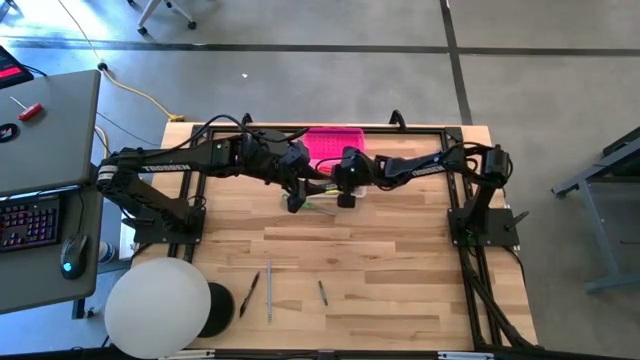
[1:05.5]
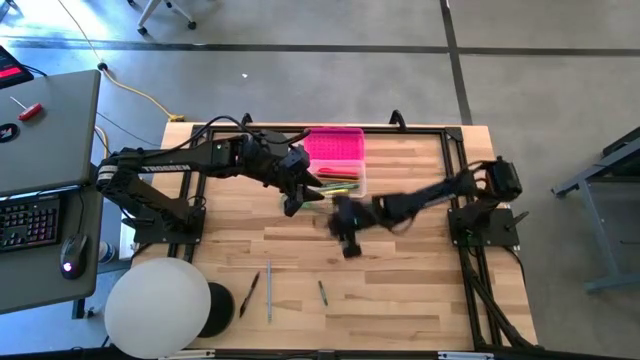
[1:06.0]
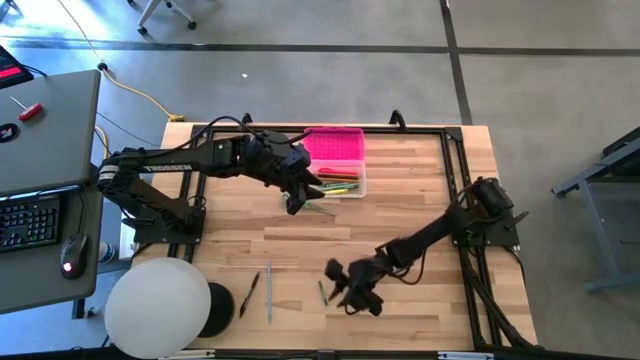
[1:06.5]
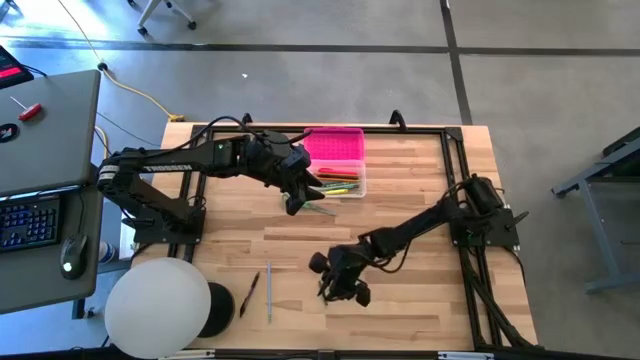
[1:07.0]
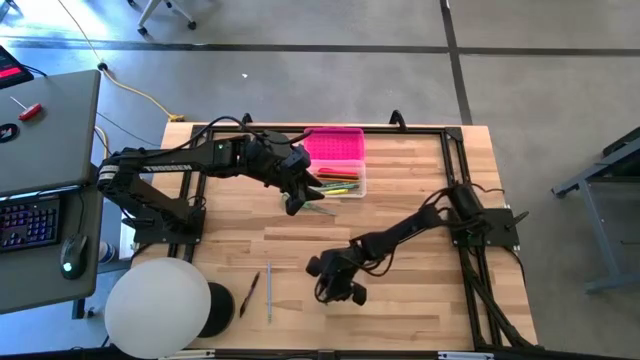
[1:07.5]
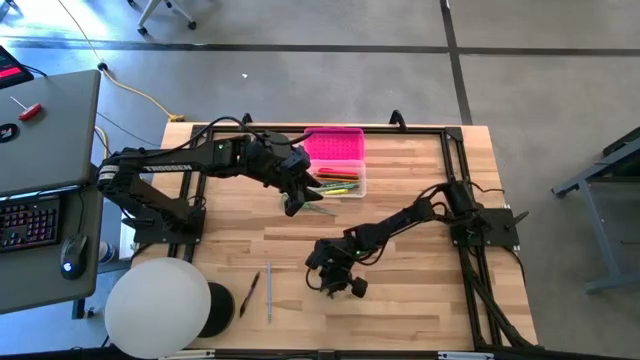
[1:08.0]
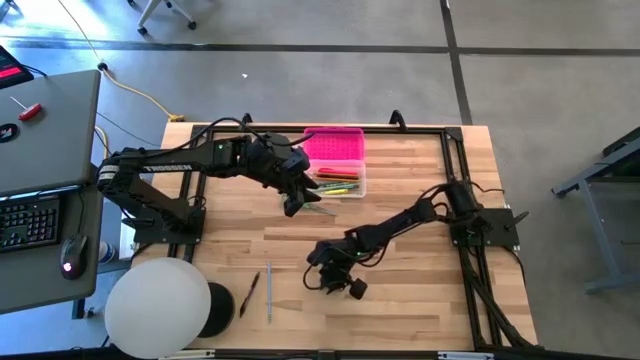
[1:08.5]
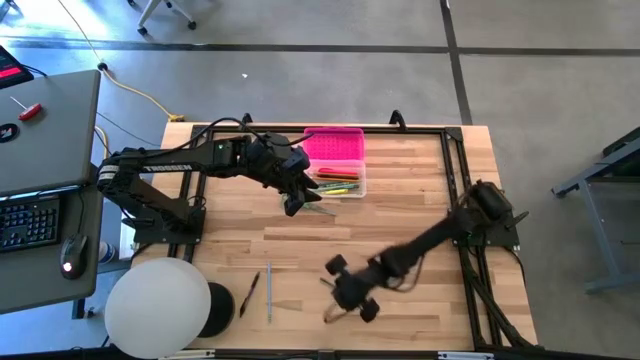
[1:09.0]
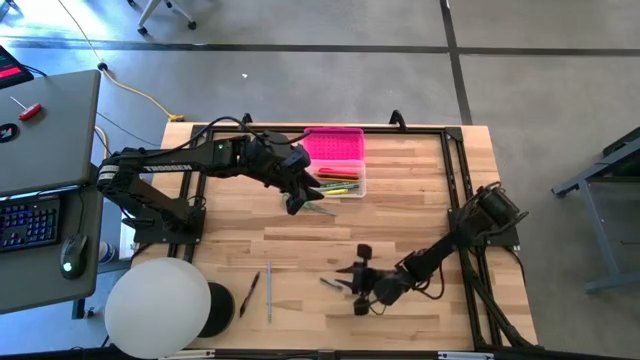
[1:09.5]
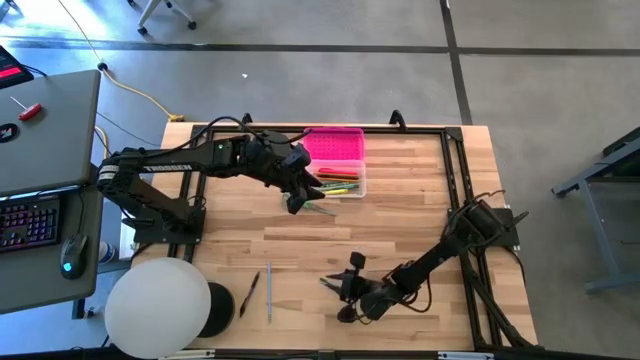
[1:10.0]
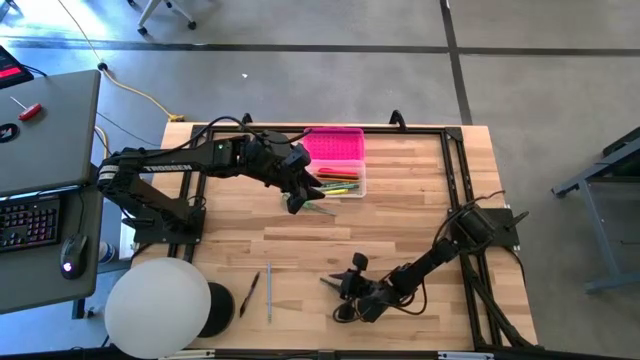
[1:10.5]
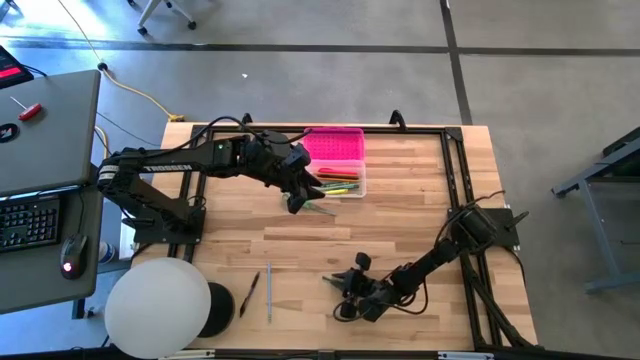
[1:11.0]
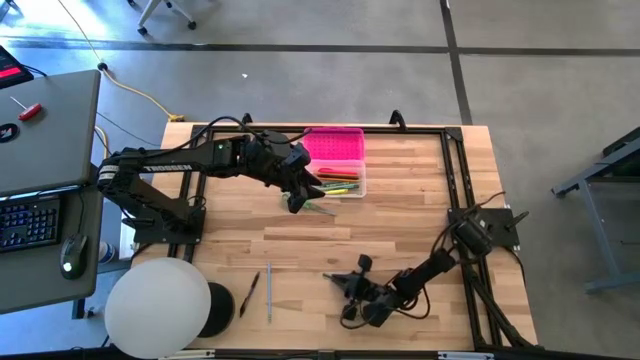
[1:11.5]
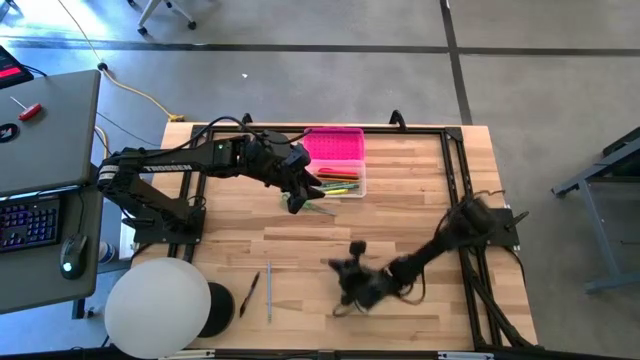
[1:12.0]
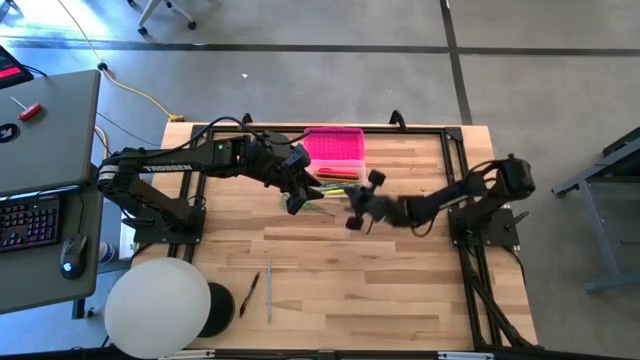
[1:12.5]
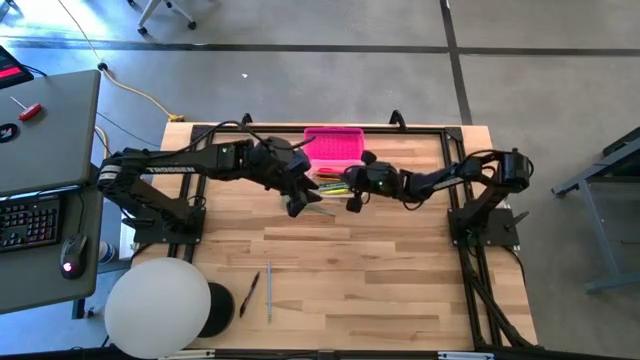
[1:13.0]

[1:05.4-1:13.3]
Task: Pick & place school supplies into a supply box
Put the dark green crayon into the supply box

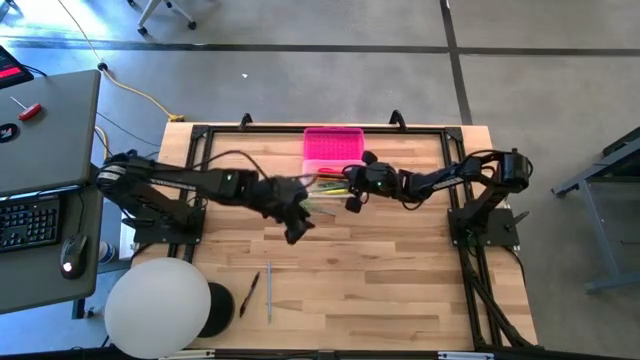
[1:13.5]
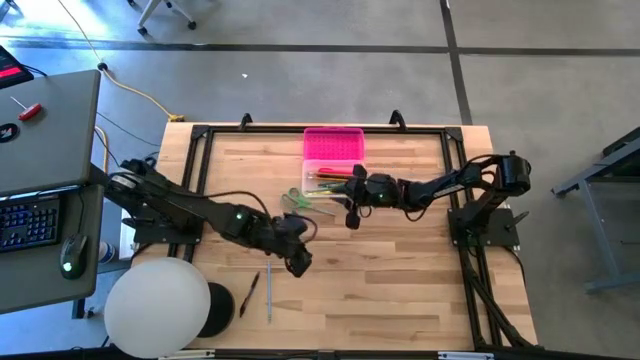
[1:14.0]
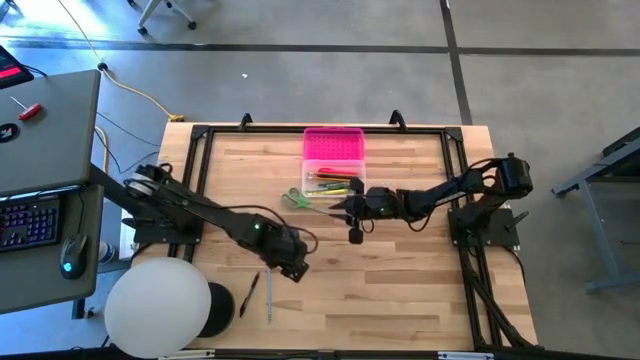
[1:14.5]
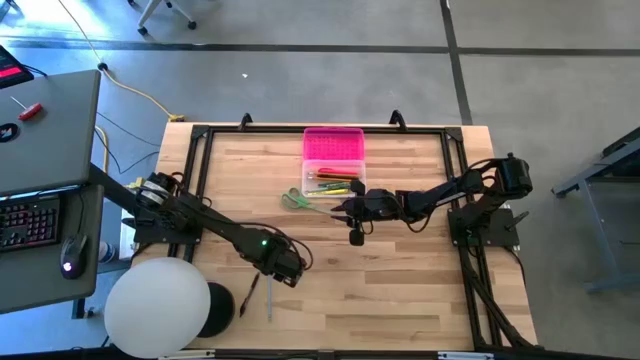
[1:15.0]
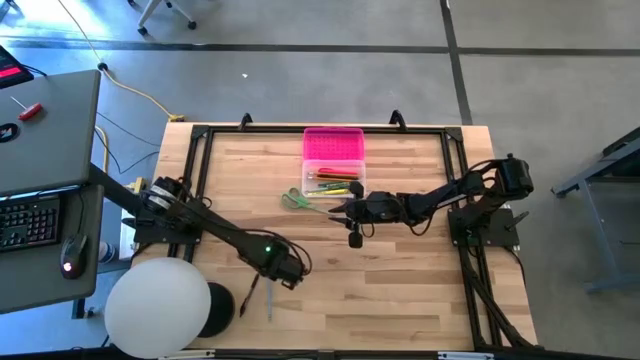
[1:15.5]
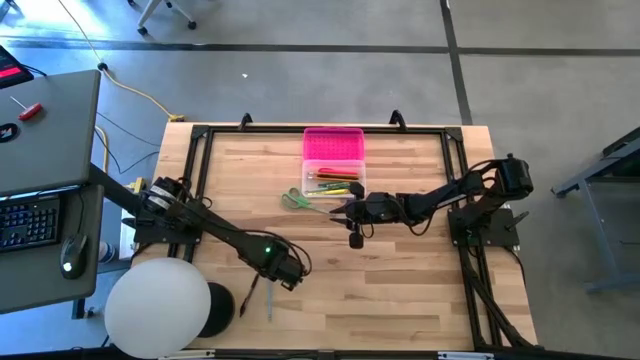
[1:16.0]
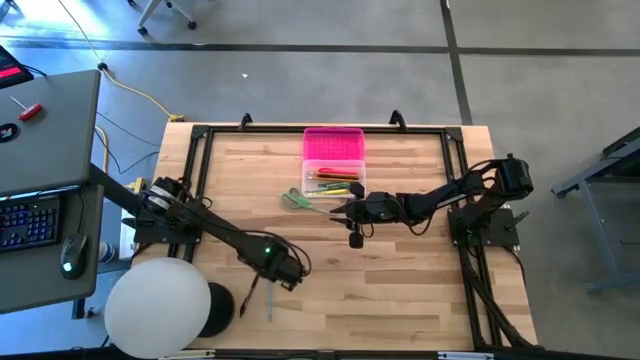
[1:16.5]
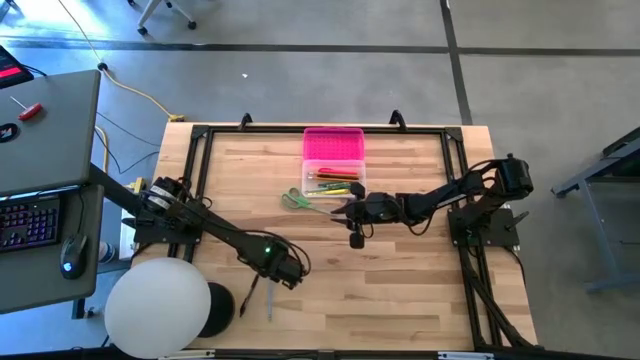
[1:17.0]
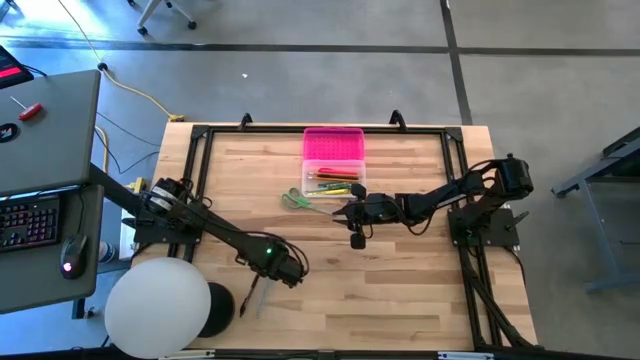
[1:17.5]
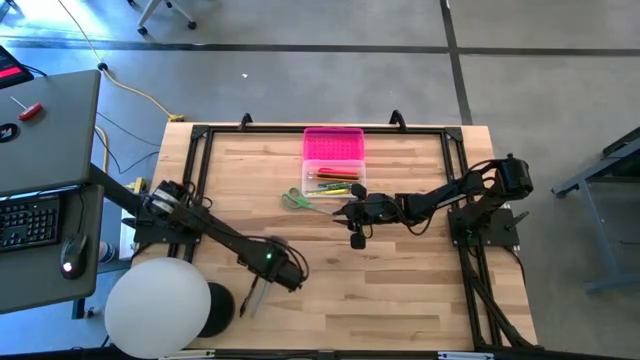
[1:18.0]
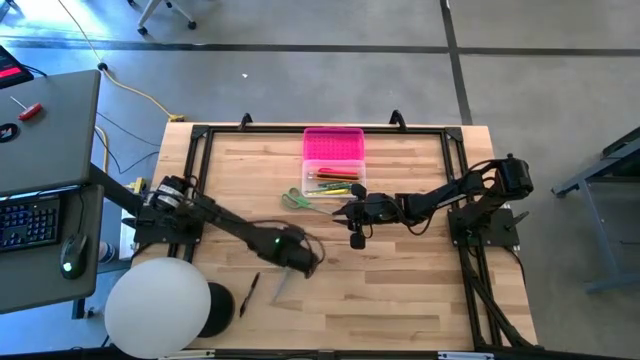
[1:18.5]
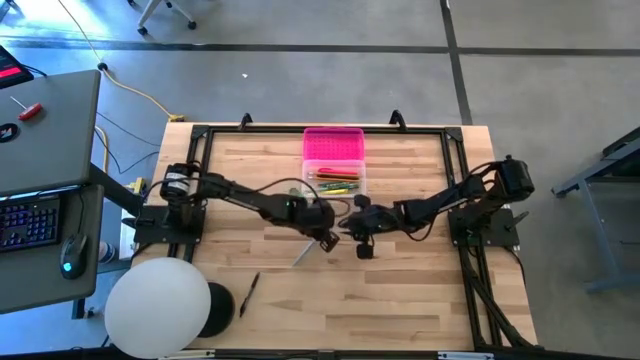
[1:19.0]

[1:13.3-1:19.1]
Put the blue pencil into the supply box

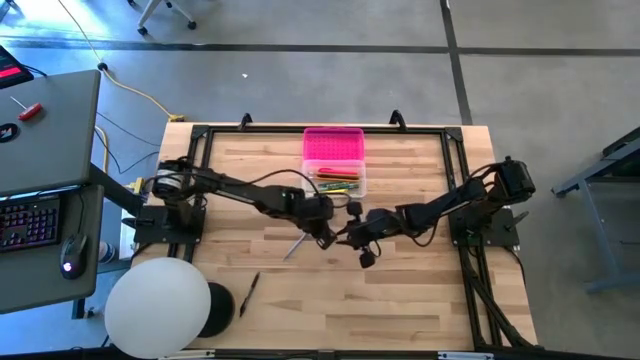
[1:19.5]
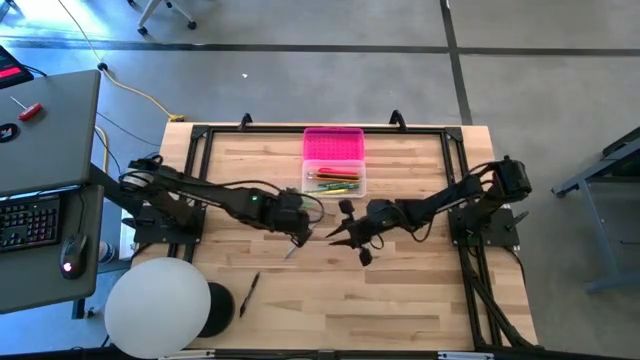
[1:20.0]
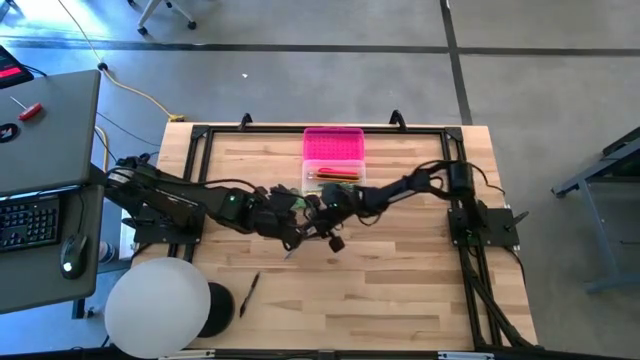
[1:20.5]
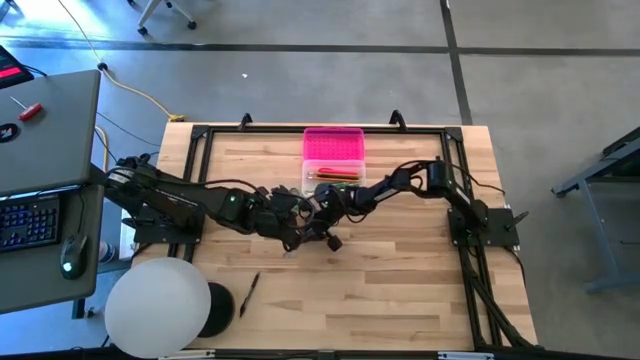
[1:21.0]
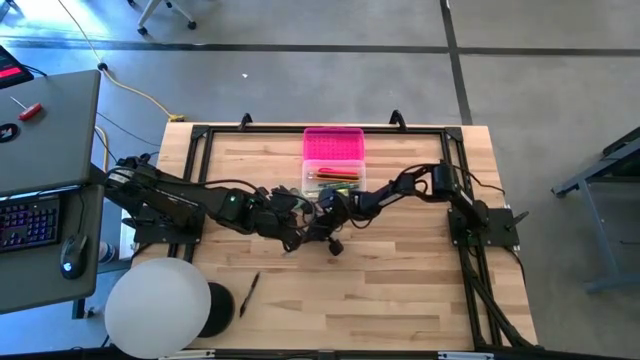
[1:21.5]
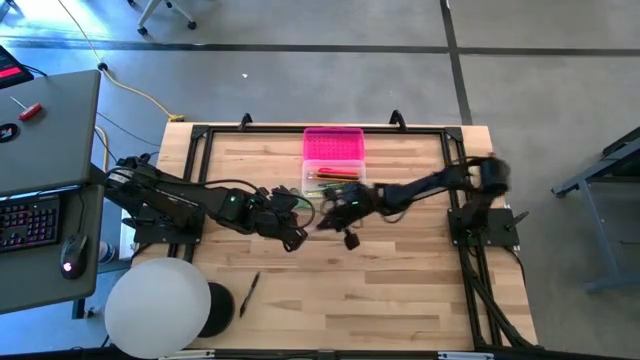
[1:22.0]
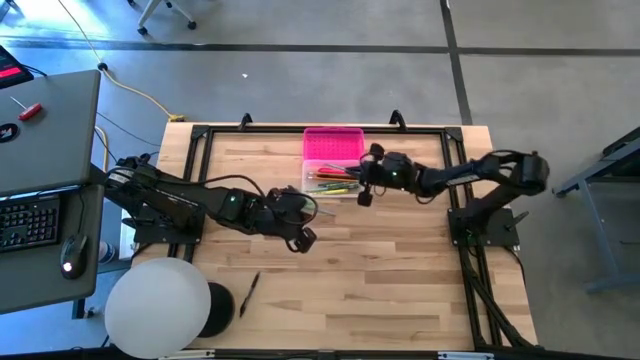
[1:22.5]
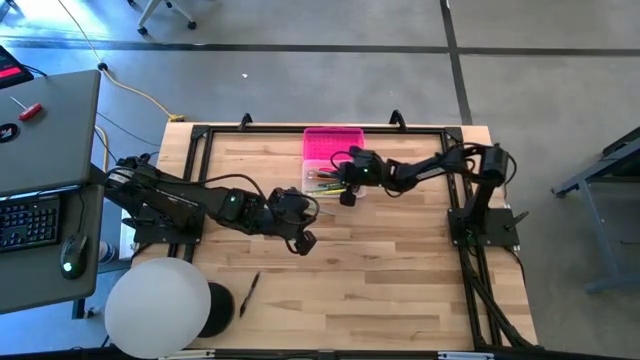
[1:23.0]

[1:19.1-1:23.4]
Put the blue pencil into the supply box

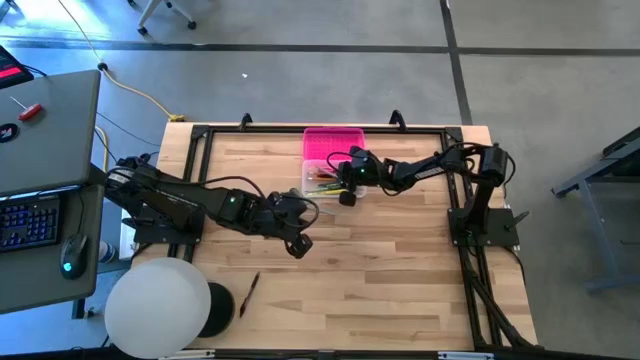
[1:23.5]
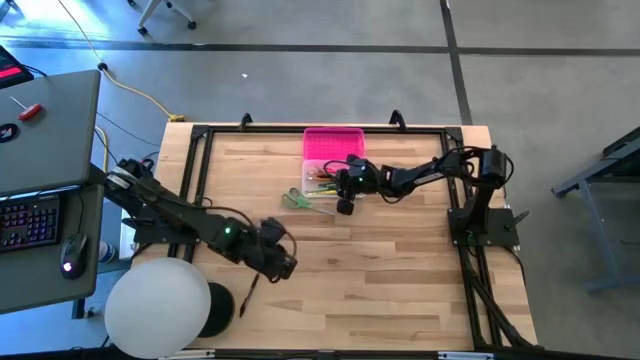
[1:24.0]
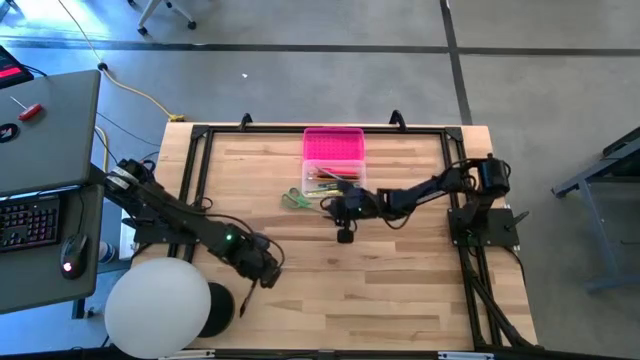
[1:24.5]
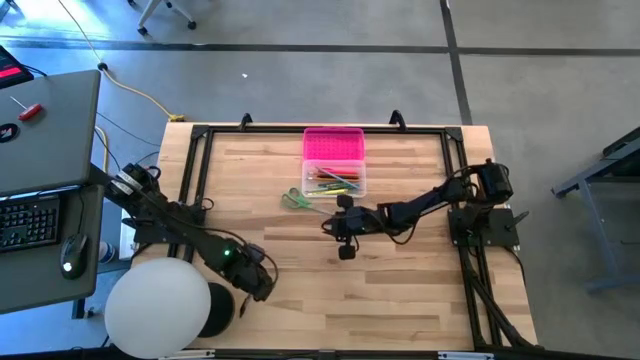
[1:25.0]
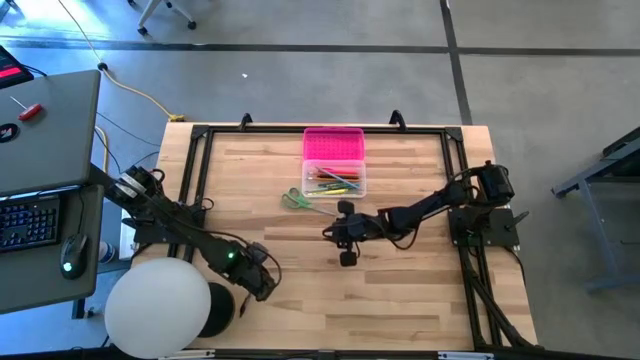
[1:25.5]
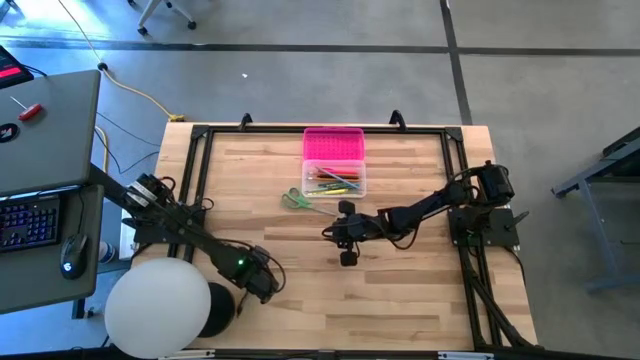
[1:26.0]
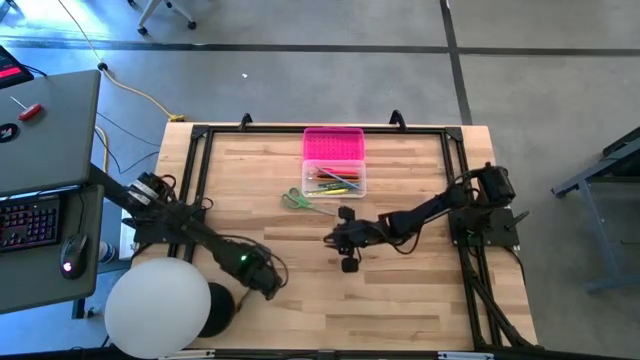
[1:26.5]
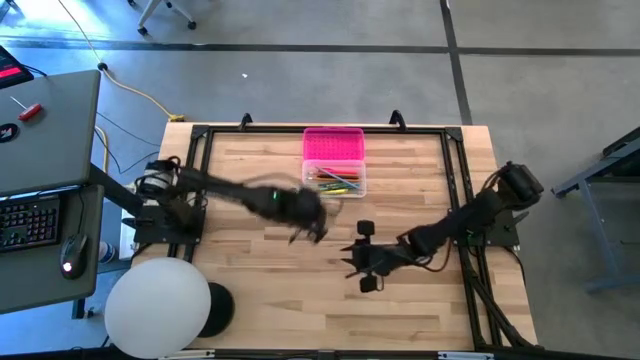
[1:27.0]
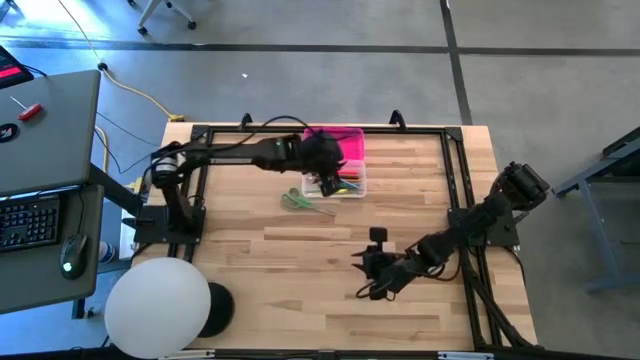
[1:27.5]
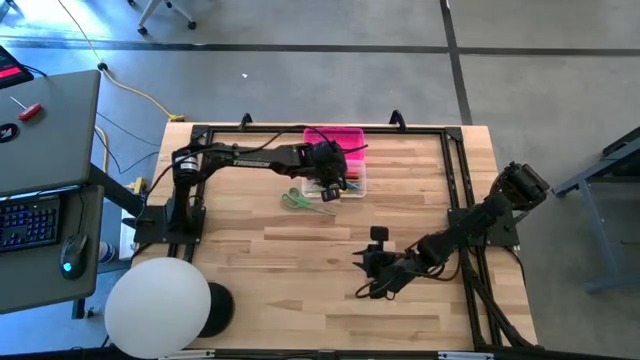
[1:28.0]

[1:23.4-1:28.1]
Put the black pen into the supply box
